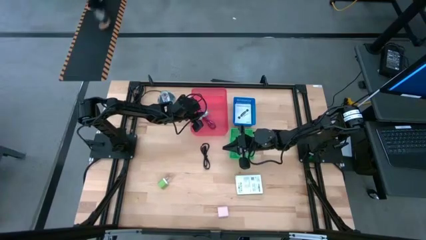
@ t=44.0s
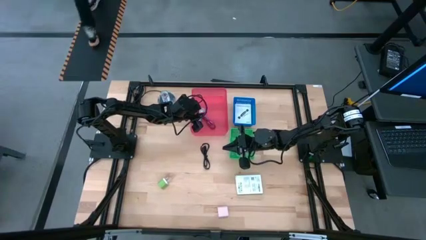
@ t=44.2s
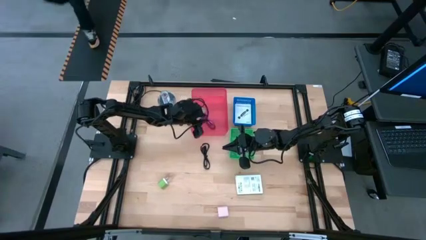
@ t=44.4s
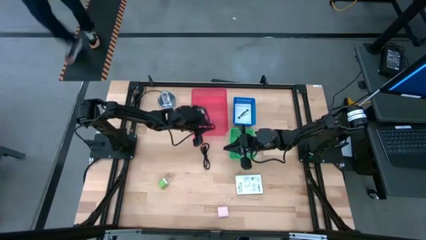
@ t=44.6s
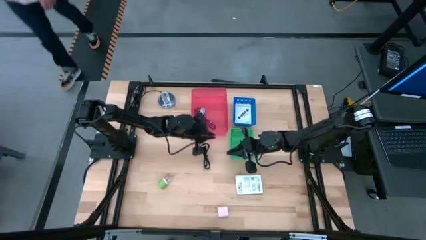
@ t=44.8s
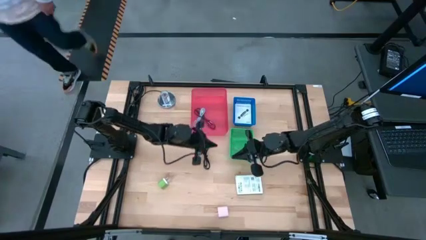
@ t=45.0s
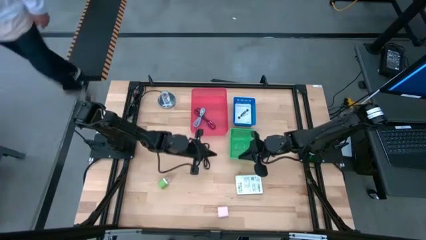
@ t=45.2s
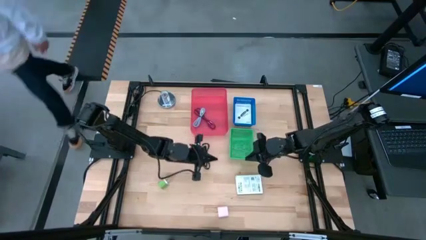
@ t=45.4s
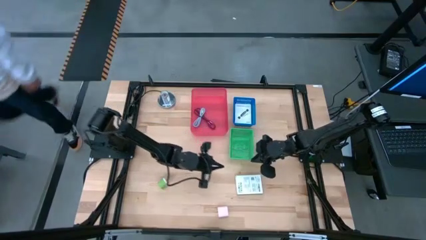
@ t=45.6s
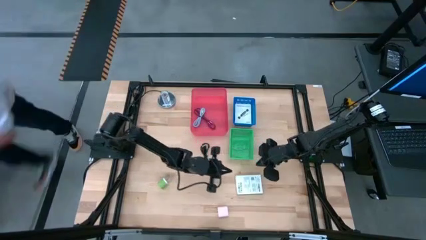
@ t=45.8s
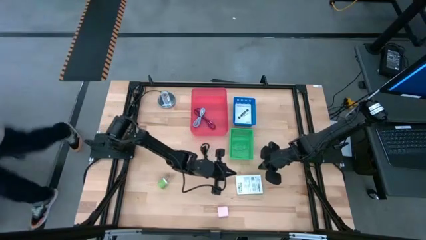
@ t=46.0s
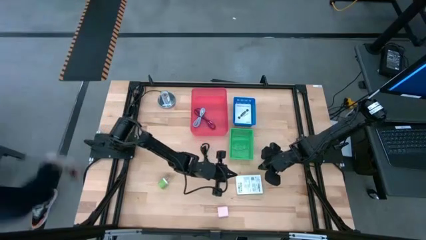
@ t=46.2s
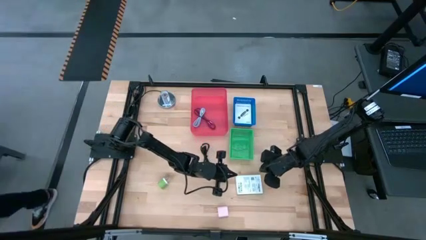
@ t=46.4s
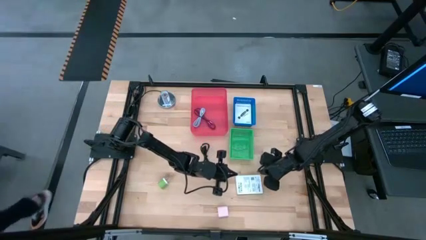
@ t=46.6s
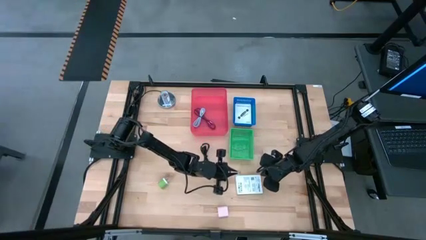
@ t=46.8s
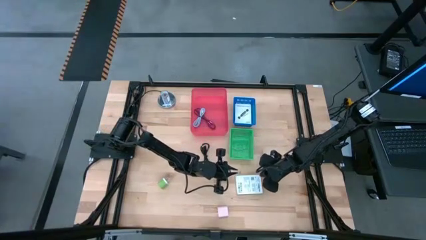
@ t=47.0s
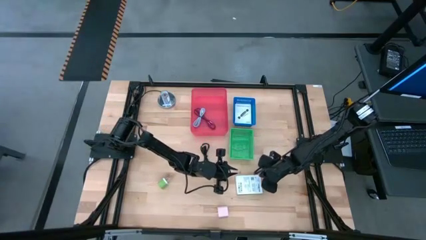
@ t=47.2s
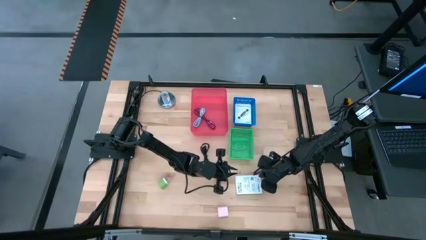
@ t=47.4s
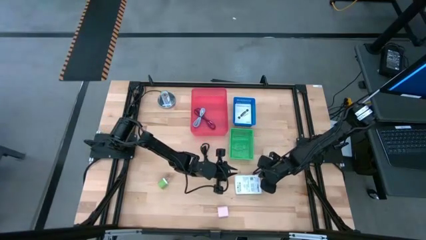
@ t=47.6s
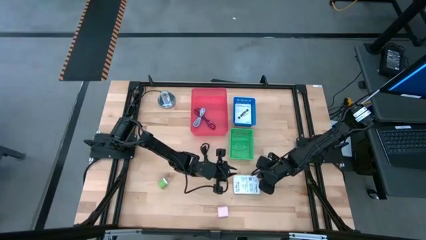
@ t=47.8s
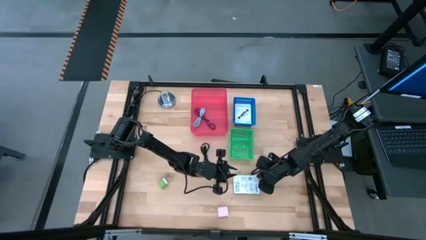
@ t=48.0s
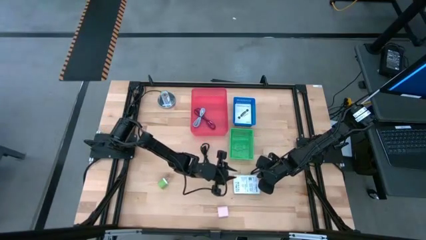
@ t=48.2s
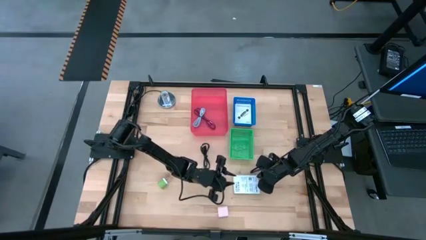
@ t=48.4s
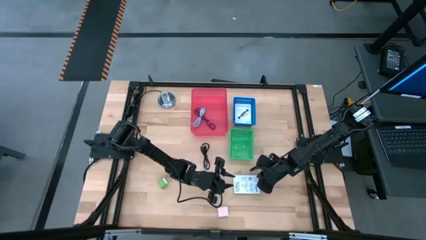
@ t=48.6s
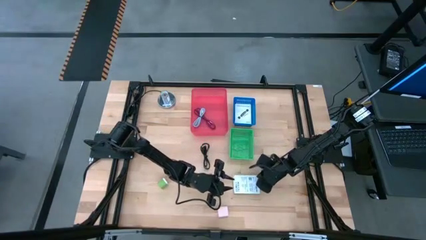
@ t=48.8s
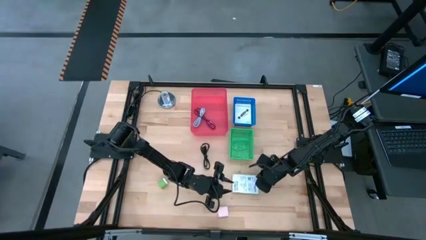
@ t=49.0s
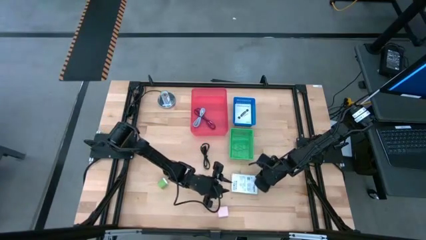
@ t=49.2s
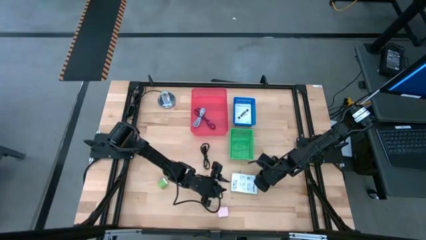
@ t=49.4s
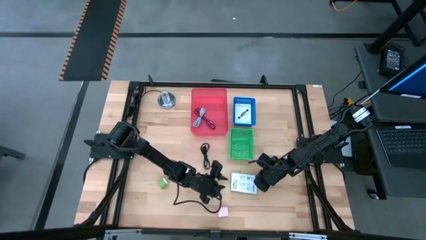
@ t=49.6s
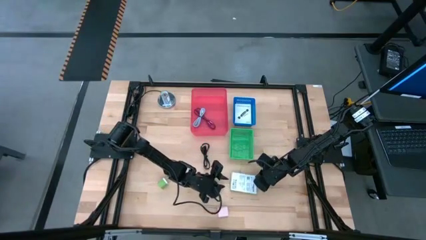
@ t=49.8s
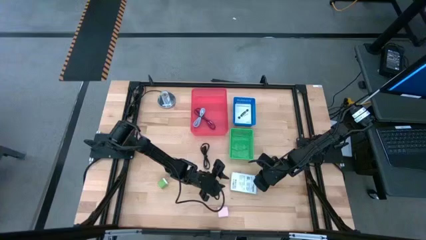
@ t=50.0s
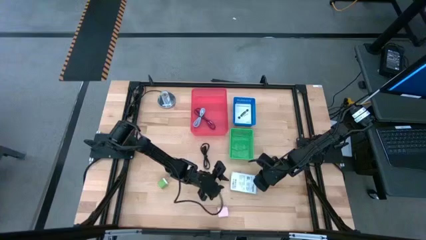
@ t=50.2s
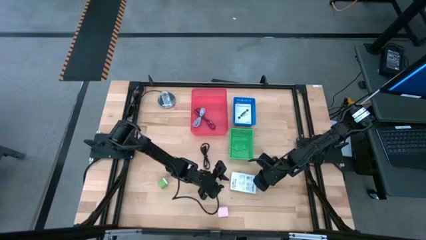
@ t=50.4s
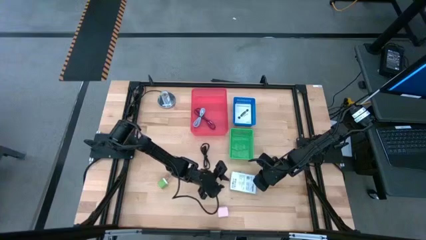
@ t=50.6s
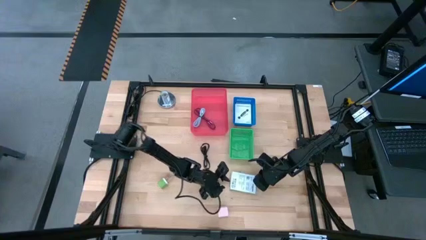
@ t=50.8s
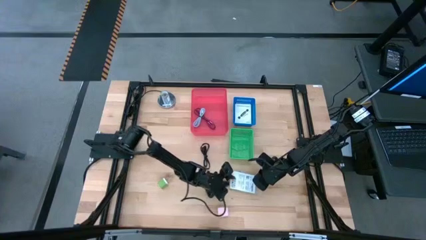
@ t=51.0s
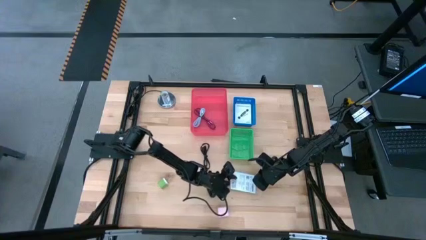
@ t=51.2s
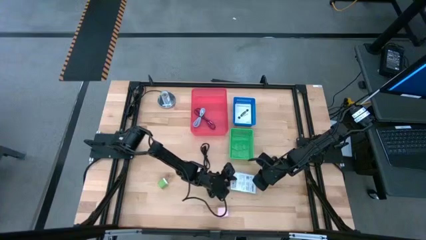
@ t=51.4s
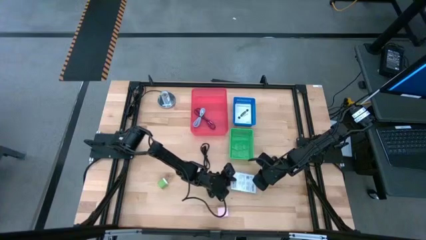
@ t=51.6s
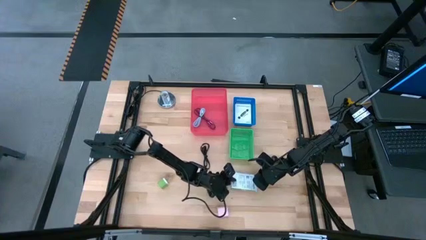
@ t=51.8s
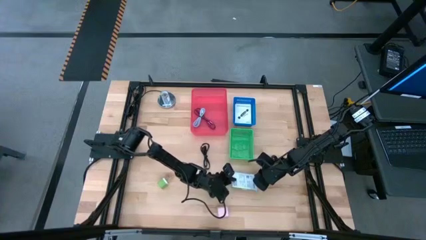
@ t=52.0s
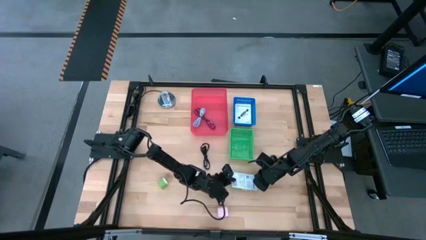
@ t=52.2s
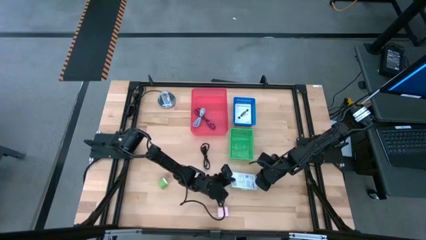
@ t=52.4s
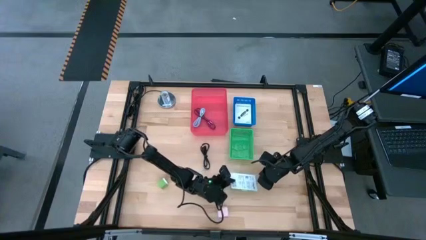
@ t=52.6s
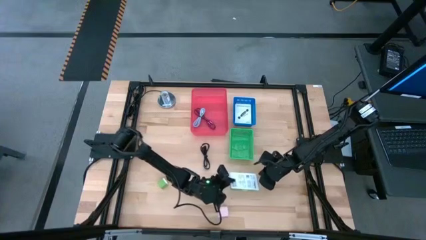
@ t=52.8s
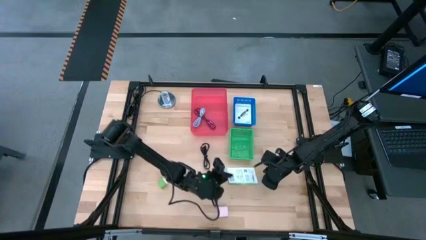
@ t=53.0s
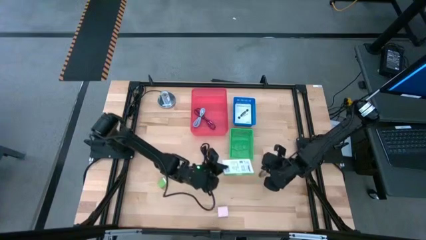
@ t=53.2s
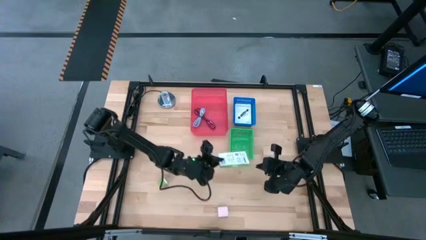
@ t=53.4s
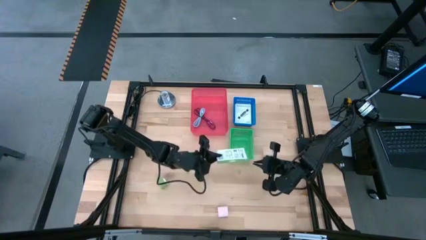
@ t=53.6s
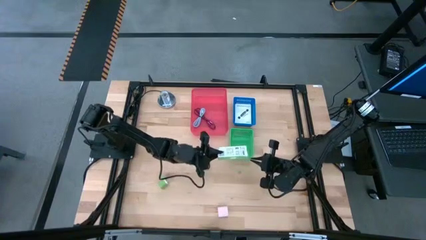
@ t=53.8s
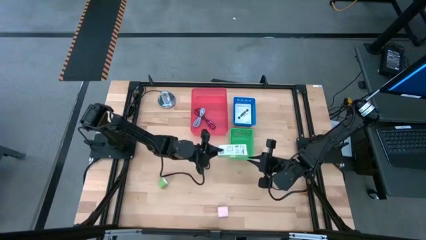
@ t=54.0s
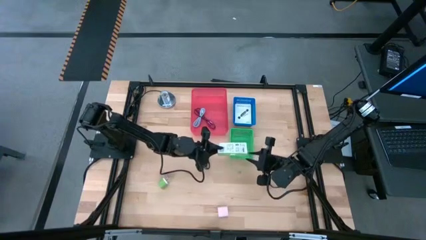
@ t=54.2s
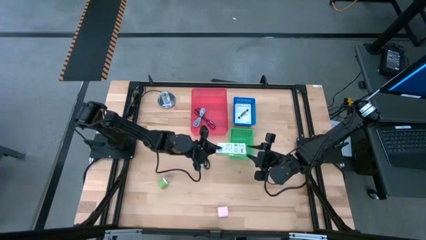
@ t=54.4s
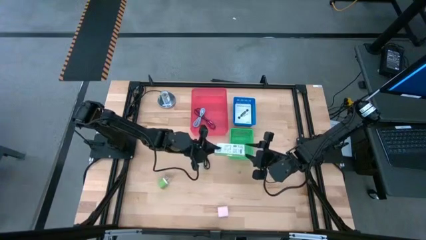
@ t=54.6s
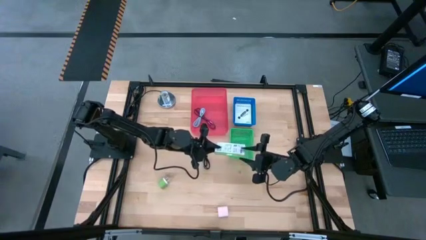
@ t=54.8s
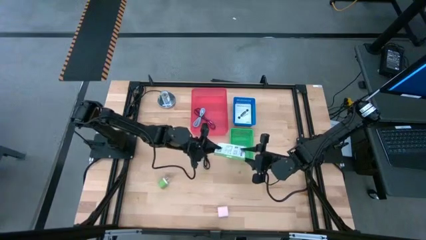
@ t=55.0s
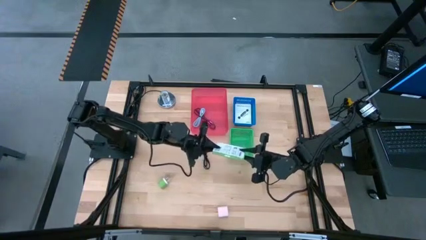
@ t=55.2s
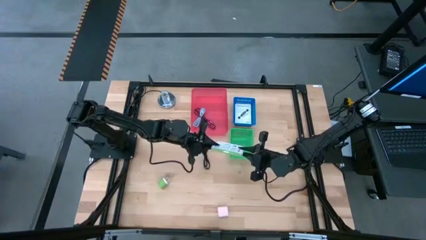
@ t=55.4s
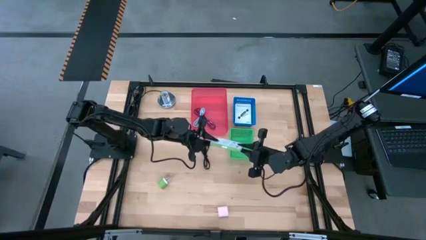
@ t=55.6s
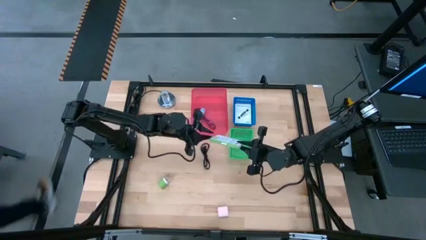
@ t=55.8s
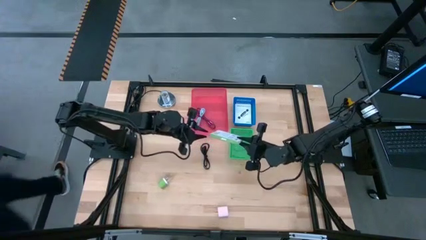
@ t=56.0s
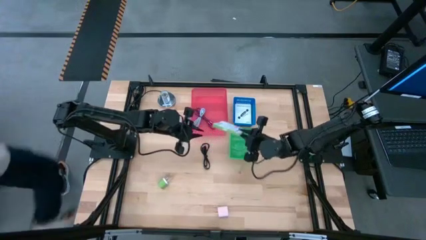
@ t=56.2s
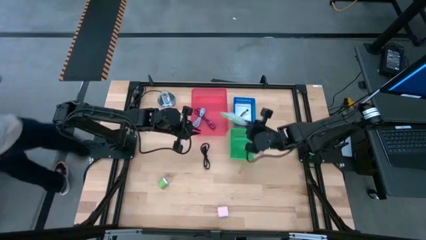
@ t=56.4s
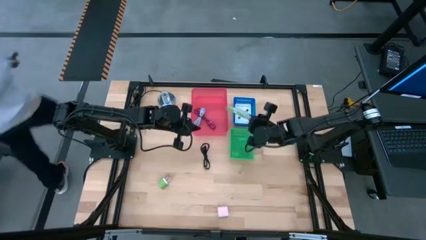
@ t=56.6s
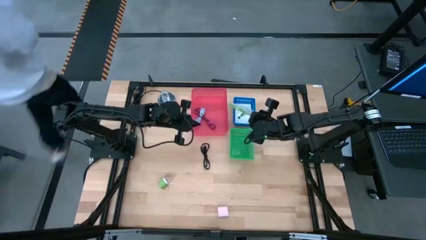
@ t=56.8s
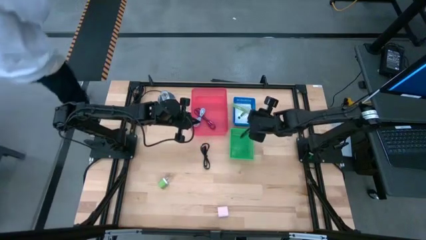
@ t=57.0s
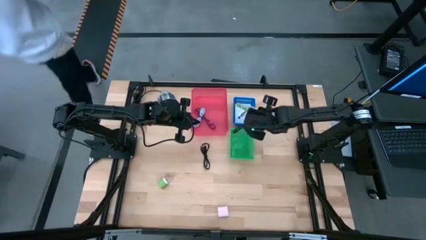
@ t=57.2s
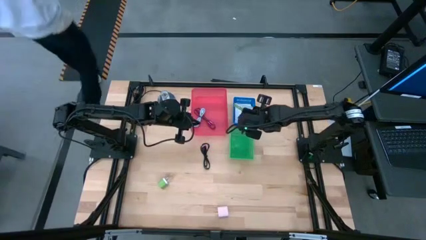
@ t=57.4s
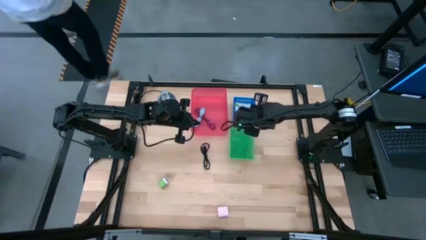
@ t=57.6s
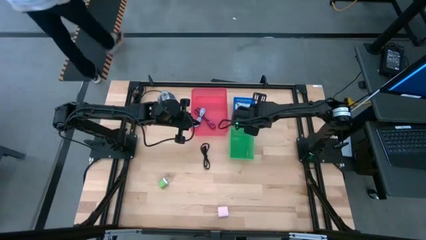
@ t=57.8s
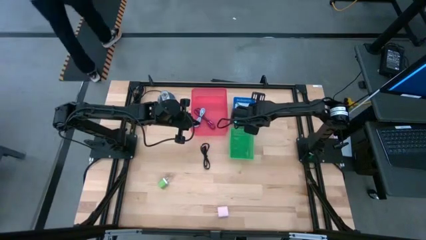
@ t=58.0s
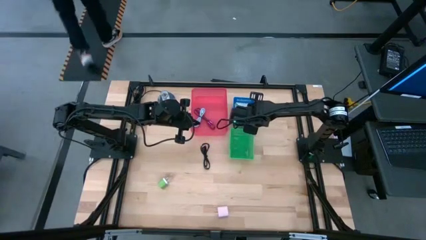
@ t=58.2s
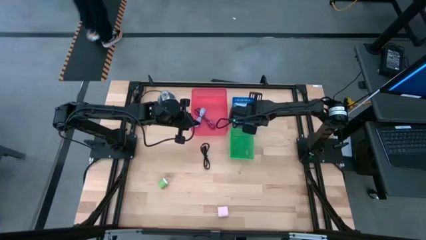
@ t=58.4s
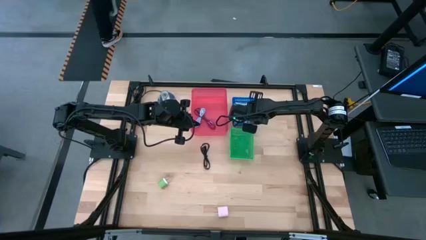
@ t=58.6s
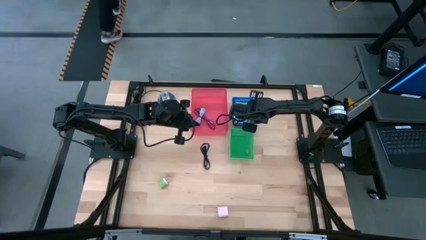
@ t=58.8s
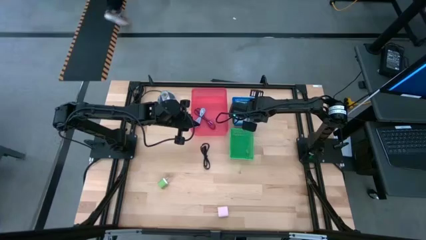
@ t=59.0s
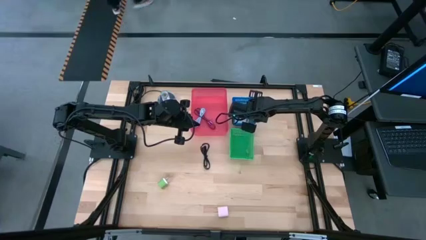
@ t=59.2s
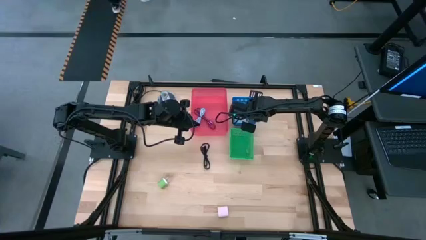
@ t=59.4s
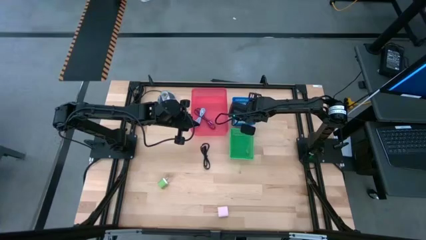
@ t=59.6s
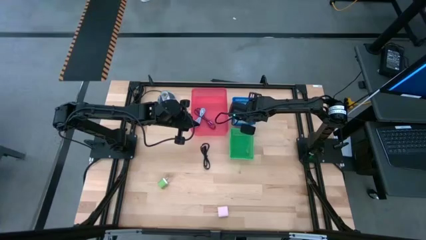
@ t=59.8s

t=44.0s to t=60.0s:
Task: Pick and place items into bin
Put the white card reader box into the blue bin
